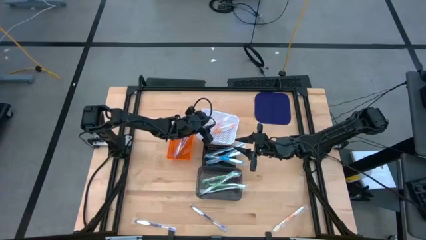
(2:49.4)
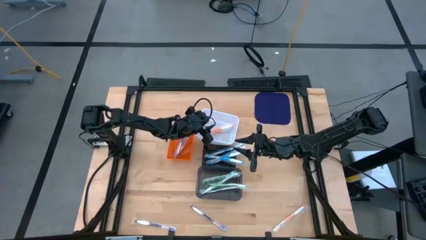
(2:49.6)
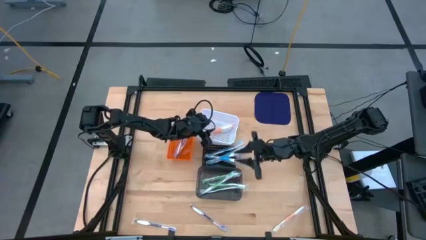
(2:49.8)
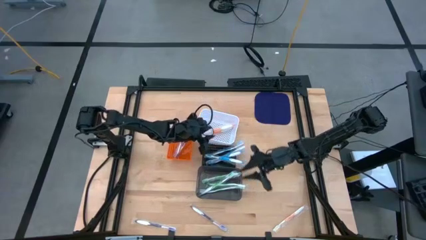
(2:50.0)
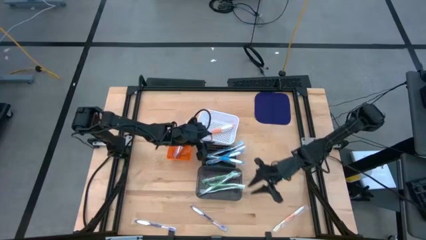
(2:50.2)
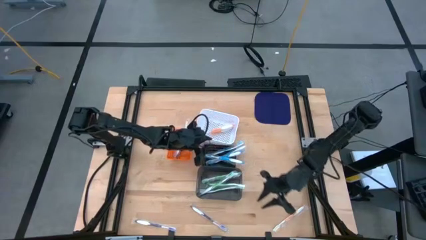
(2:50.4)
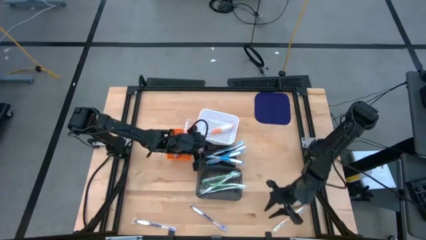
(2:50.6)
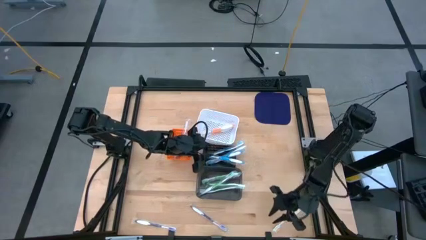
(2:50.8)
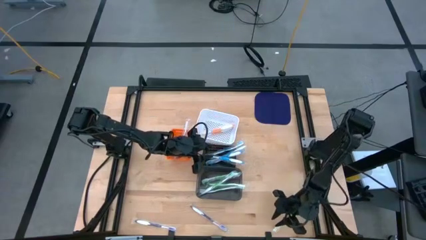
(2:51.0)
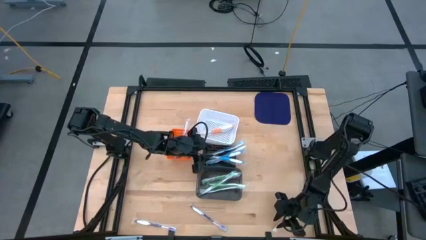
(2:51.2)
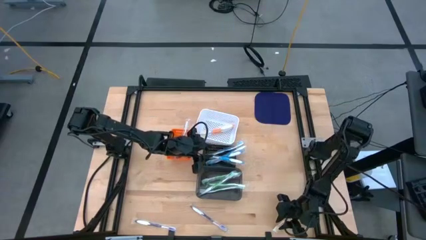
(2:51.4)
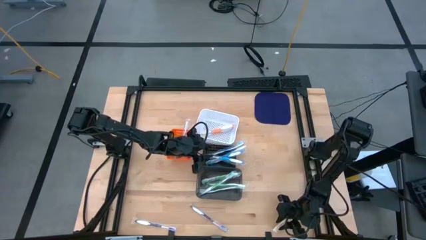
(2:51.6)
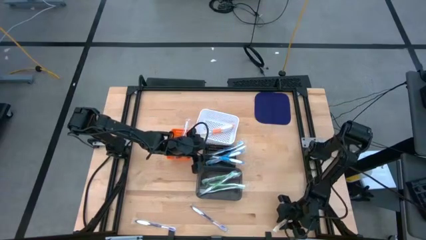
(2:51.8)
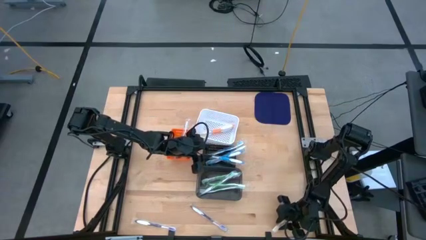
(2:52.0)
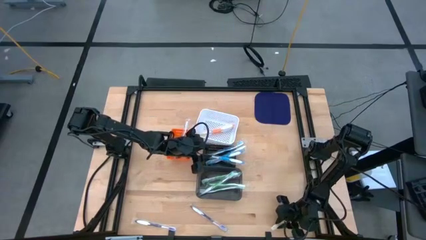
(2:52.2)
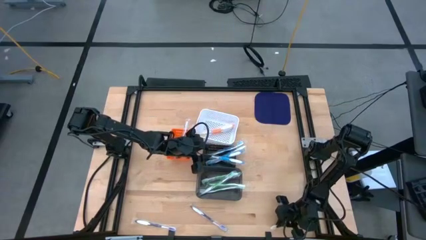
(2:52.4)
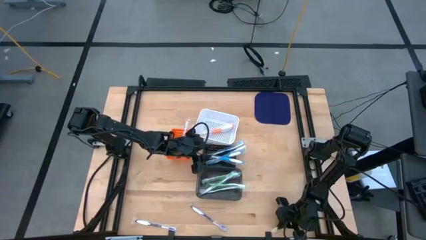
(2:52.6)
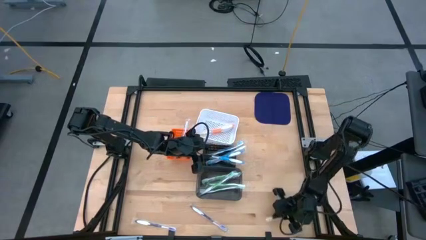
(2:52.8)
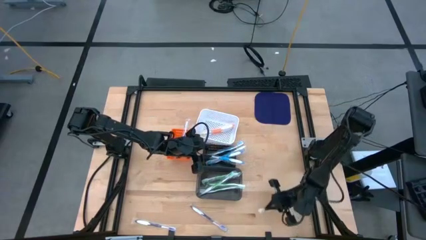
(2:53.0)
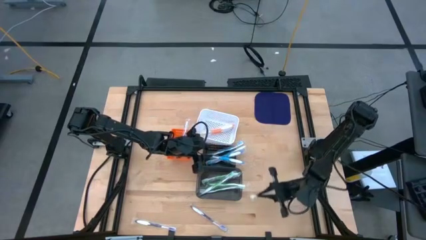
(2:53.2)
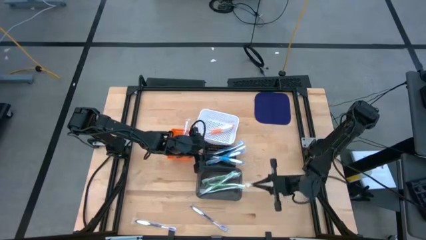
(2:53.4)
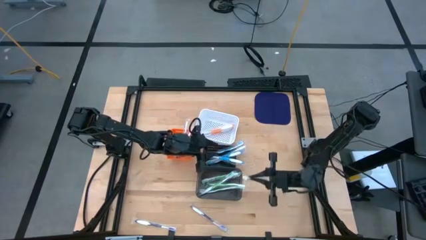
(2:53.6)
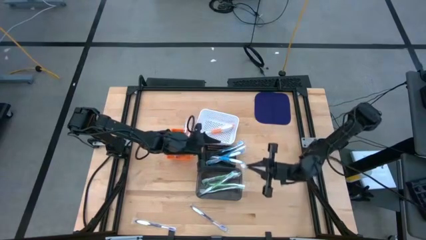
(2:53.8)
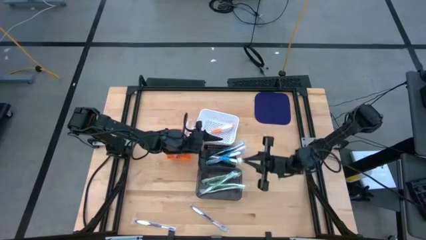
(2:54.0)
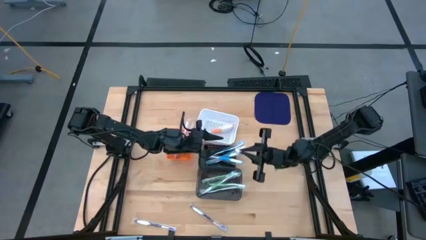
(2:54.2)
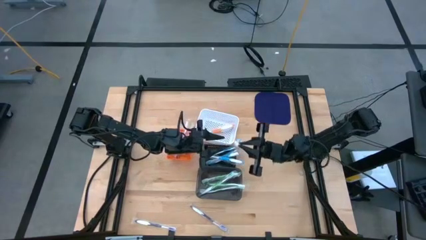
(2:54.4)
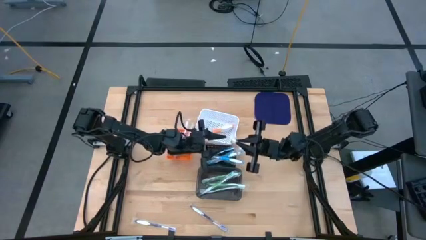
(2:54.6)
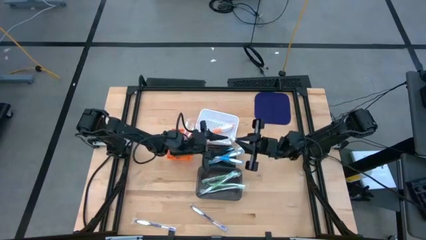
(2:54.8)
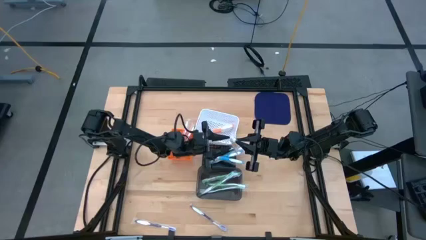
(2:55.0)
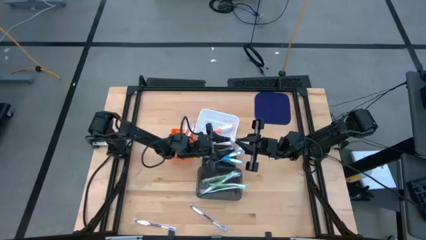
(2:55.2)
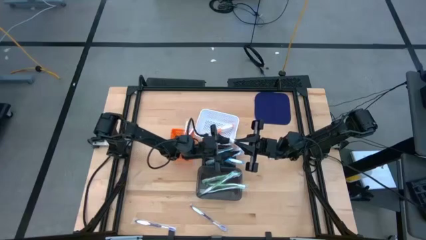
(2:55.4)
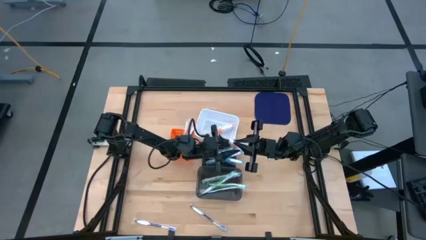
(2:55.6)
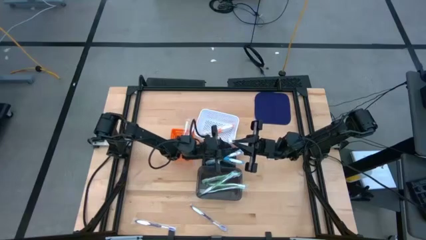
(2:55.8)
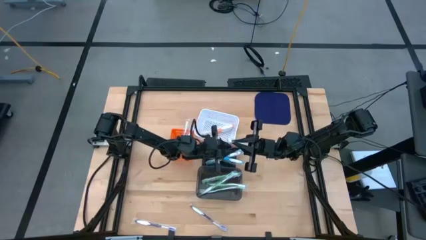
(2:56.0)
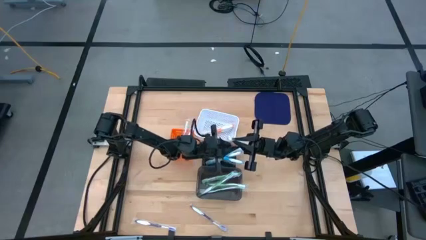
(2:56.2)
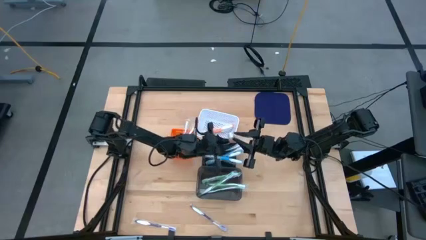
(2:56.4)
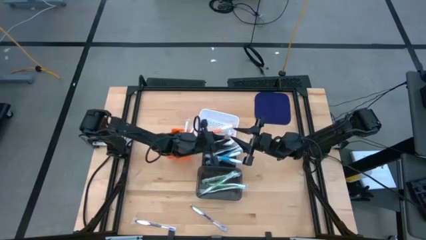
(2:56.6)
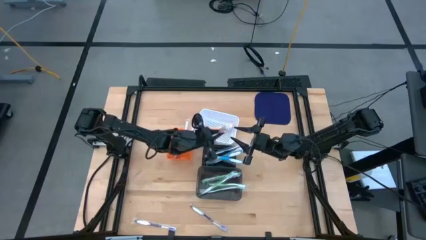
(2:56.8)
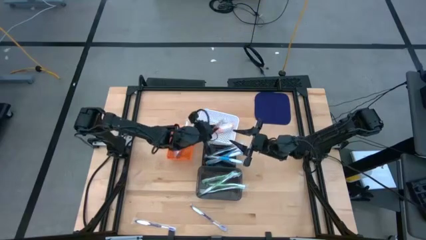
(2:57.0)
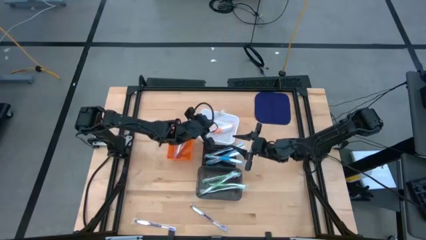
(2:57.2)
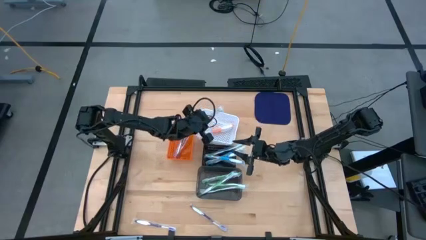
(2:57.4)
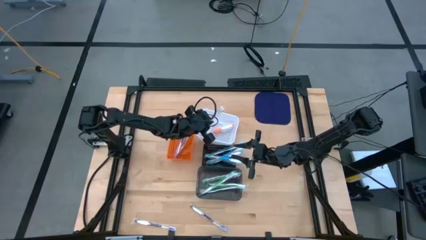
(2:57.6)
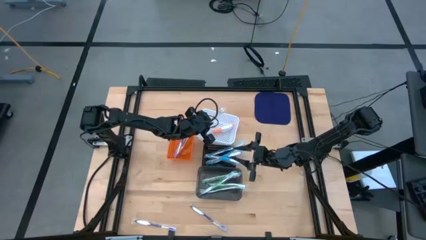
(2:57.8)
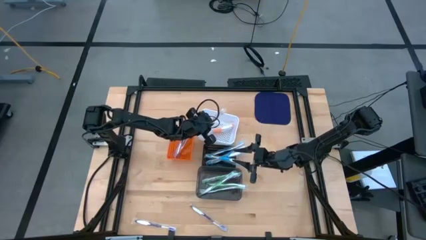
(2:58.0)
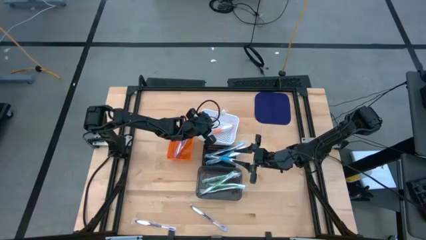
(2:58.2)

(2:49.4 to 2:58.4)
Task: Pick & Place Toothbrushes
Put the orange toothbrush into the white basket
